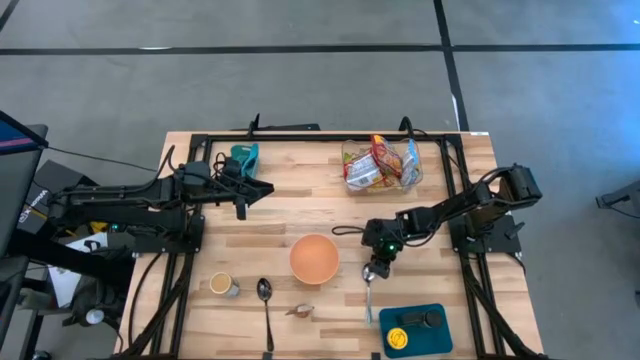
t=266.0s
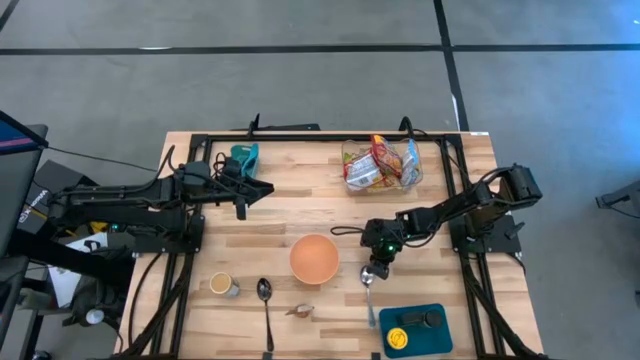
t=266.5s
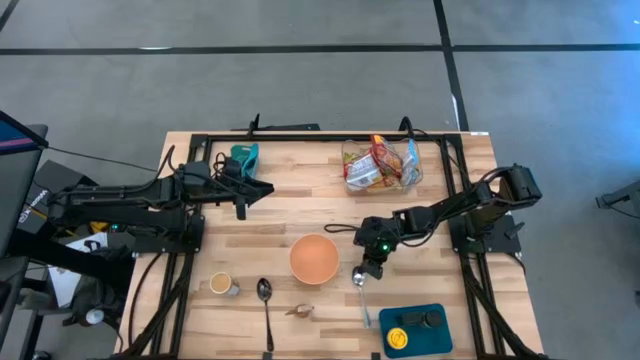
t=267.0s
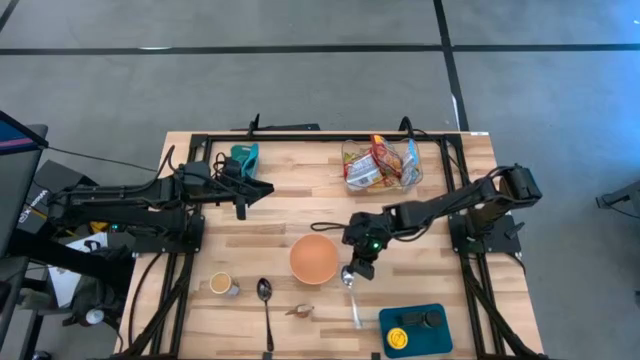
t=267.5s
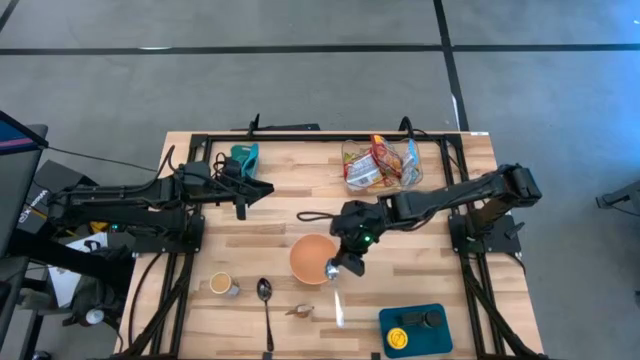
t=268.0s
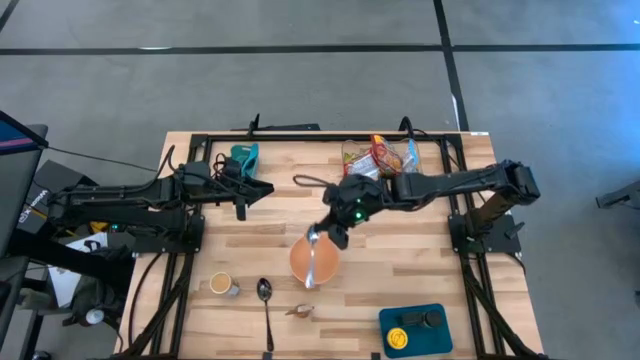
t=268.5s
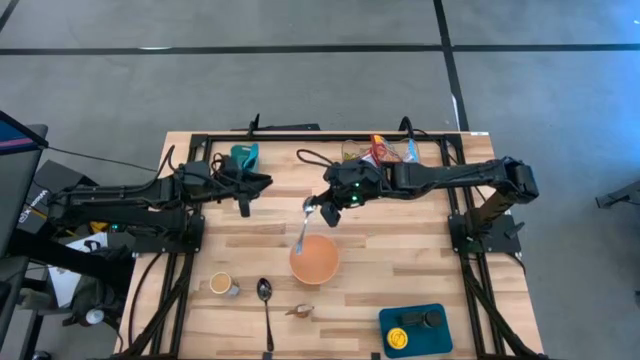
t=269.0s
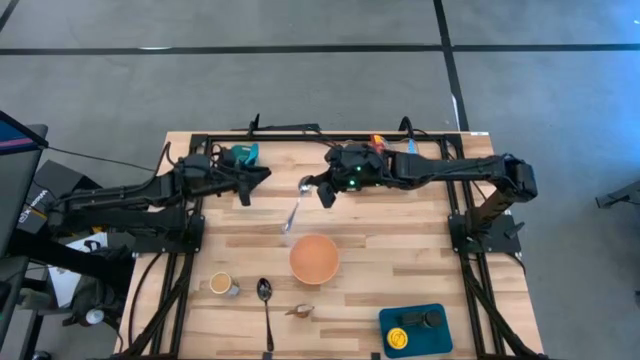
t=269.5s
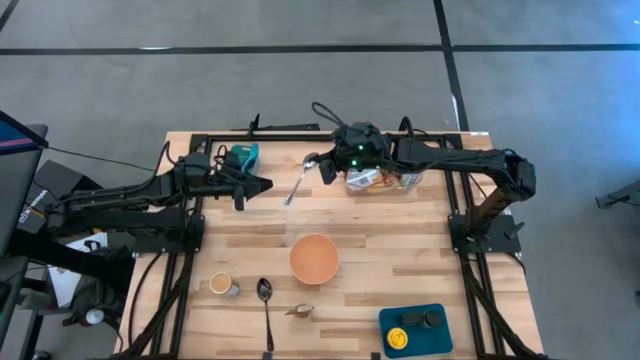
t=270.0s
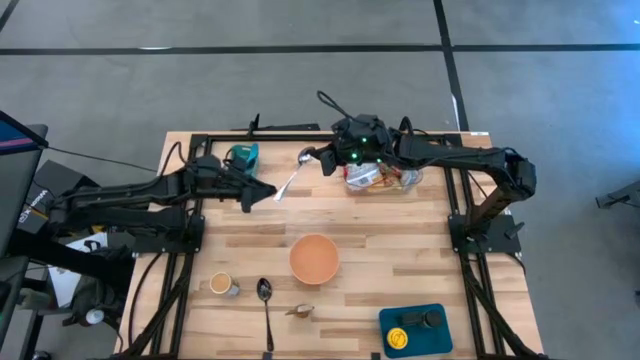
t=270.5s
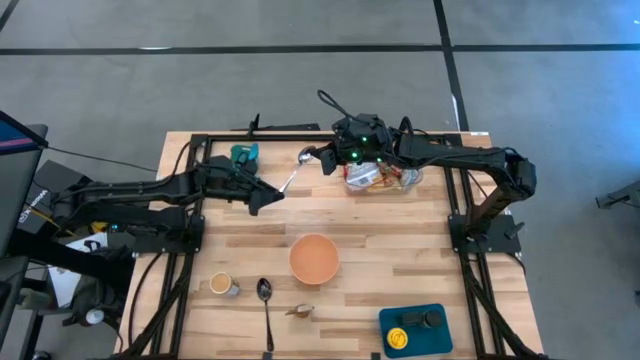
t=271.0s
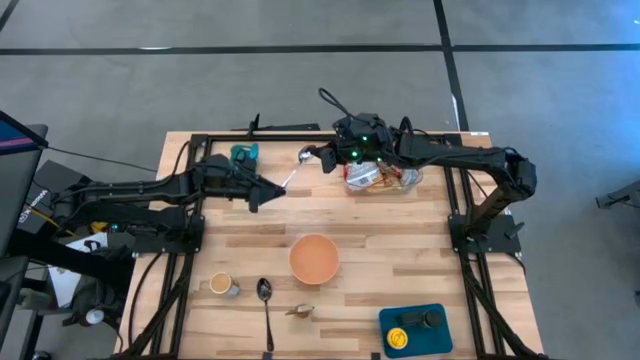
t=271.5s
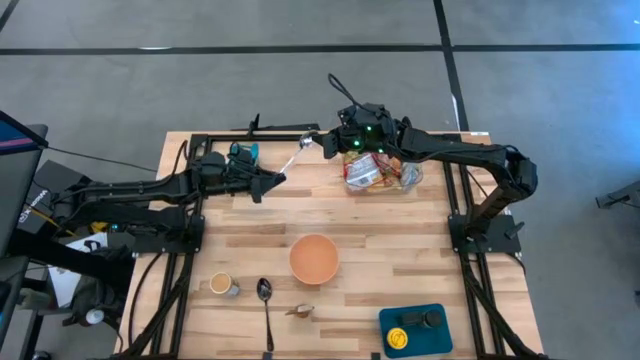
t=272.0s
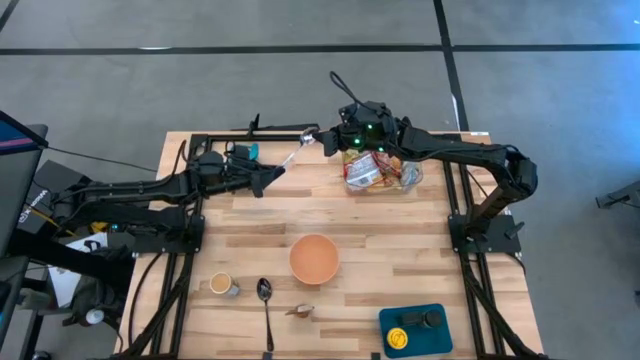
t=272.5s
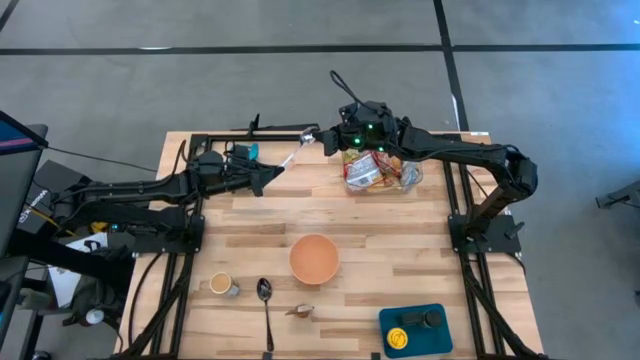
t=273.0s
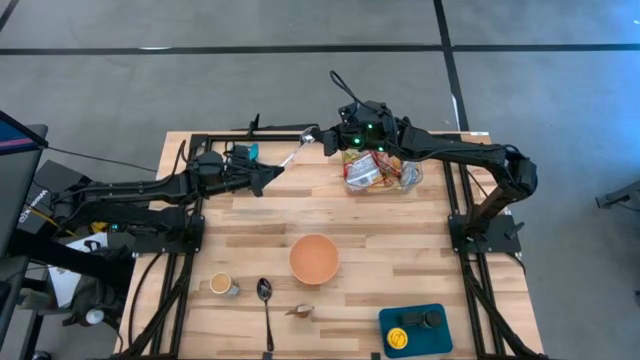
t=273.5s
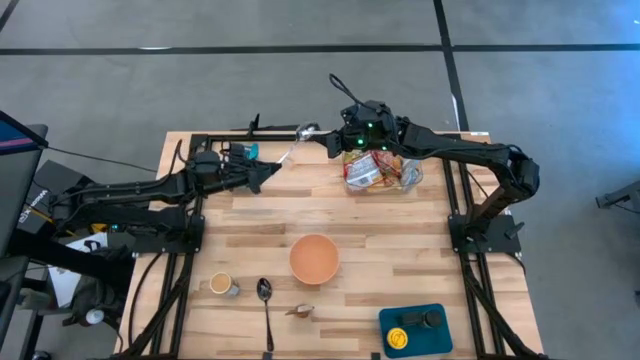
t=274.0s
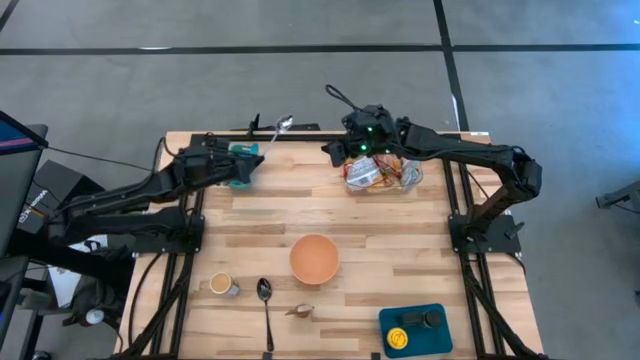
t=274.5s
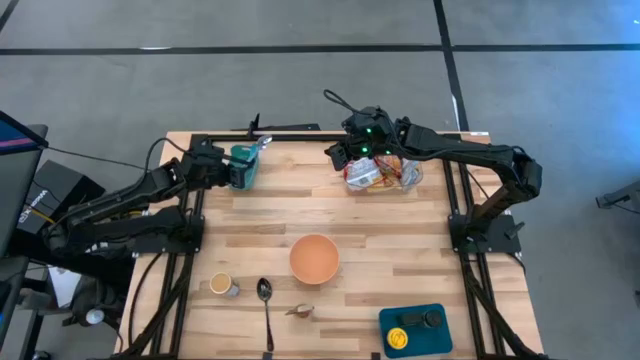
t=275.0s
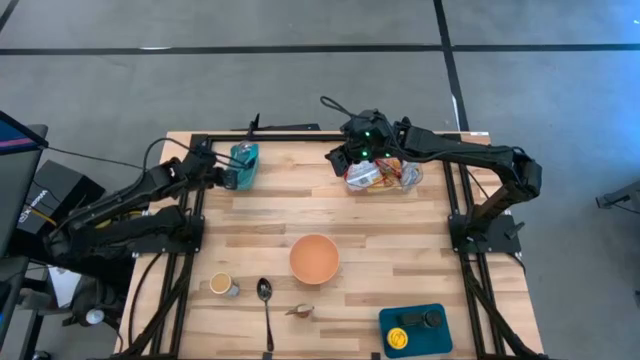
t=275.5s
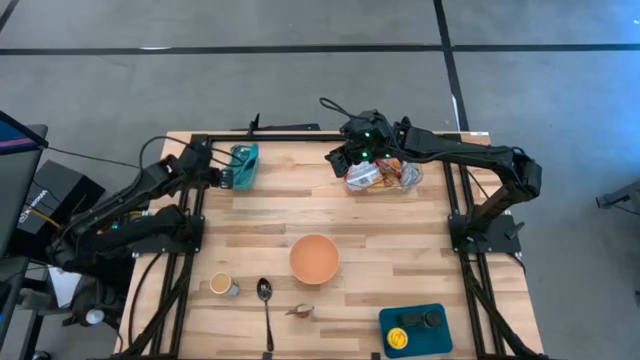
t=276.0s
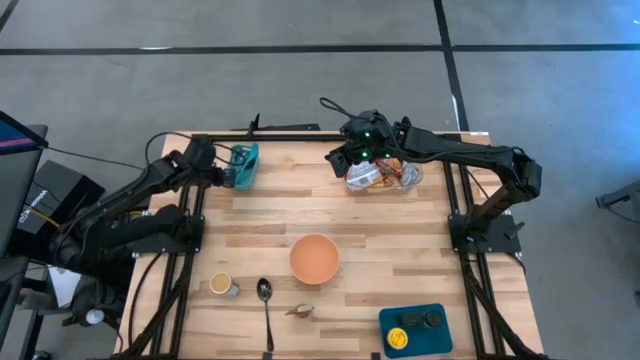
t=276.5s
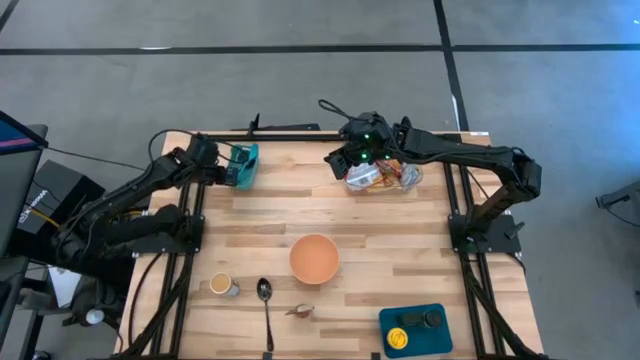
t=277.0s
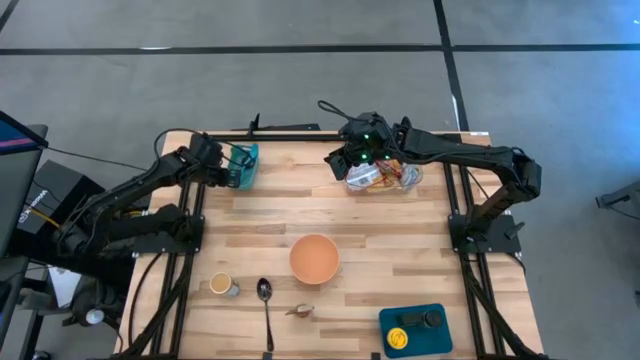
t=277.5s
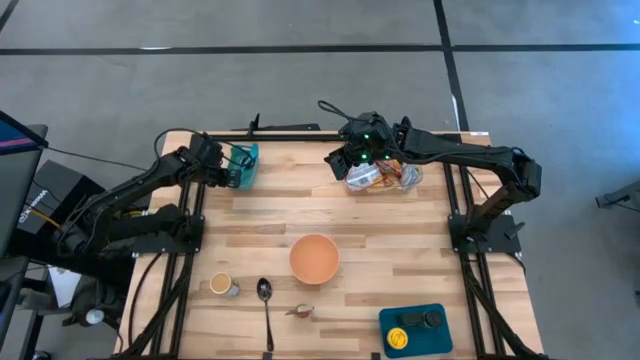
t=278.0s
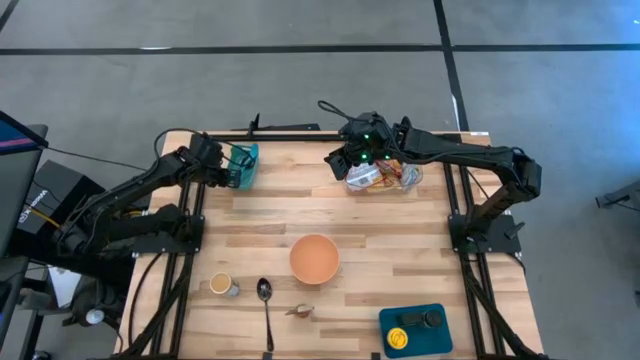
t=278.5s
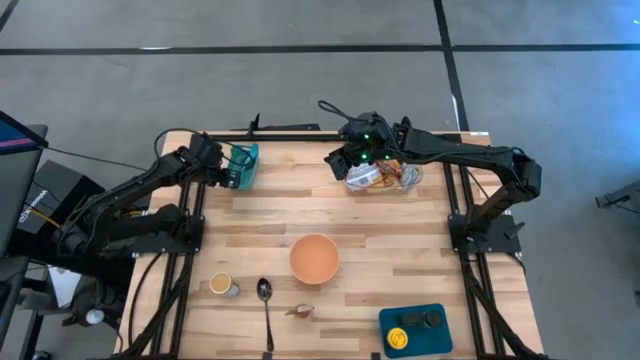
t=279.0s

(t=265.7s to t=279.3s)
Task: Pick & Place Food Item
Put the silver spoon into the light green bin

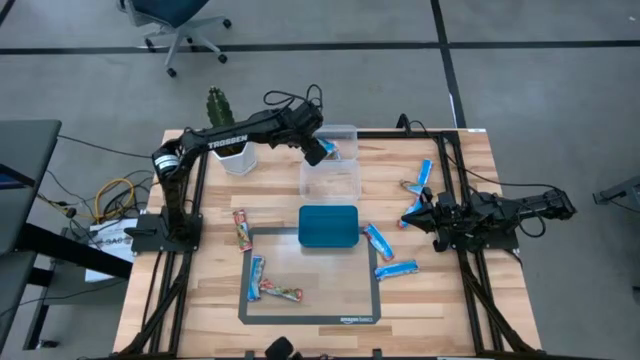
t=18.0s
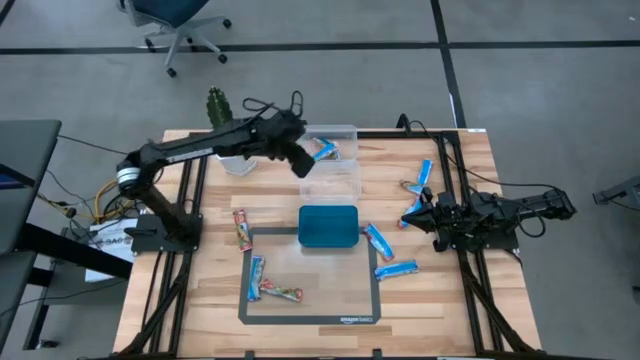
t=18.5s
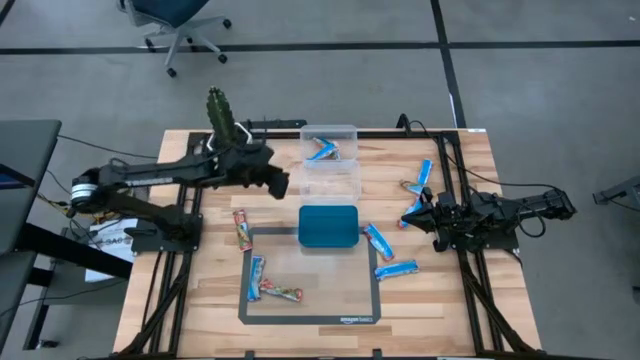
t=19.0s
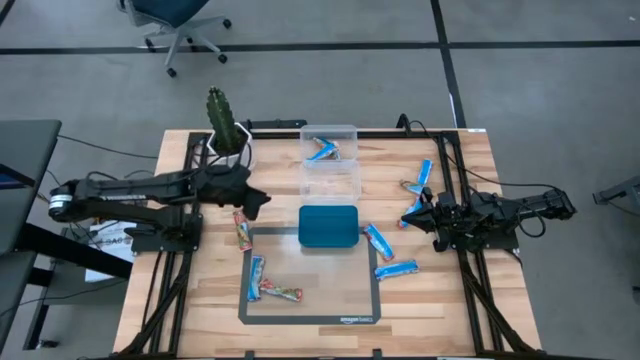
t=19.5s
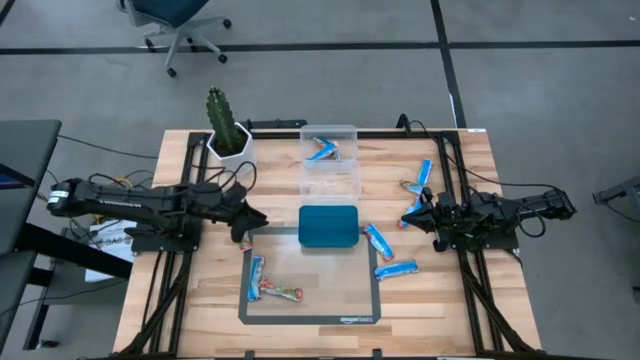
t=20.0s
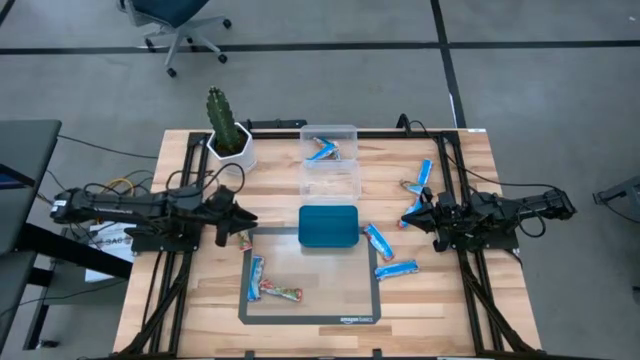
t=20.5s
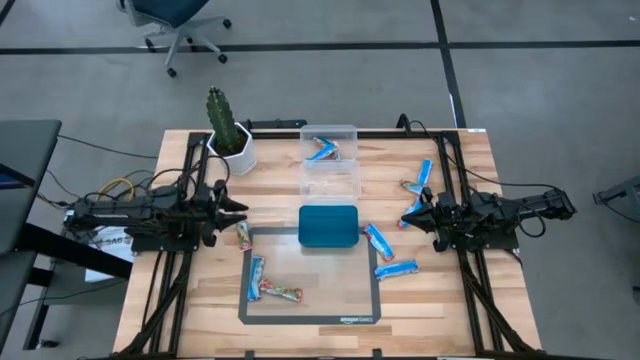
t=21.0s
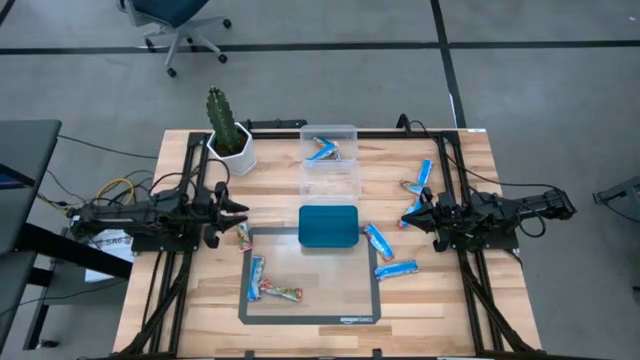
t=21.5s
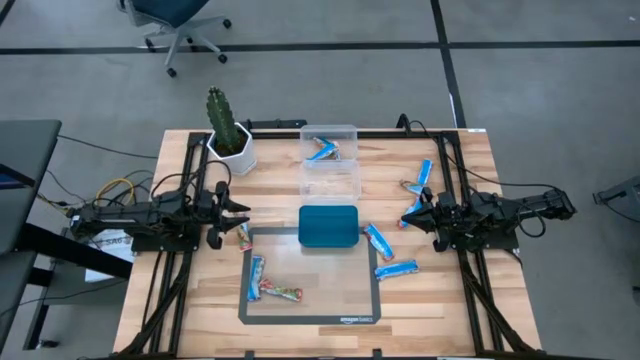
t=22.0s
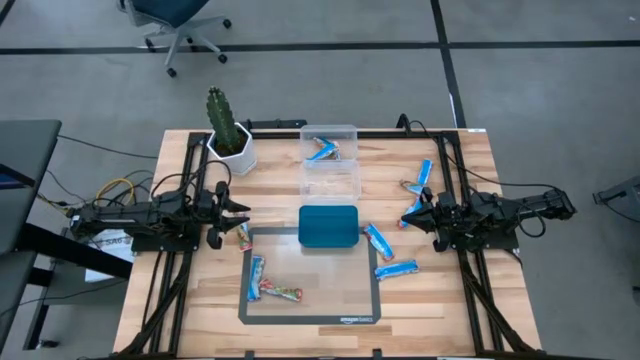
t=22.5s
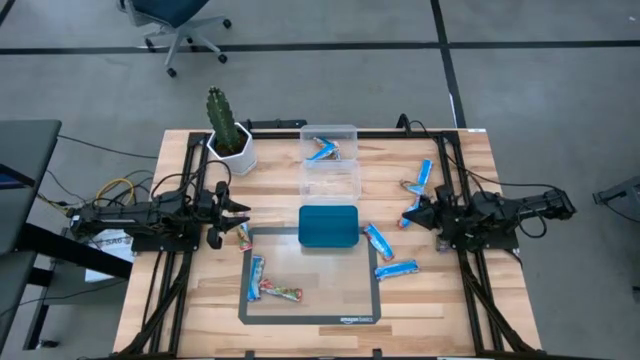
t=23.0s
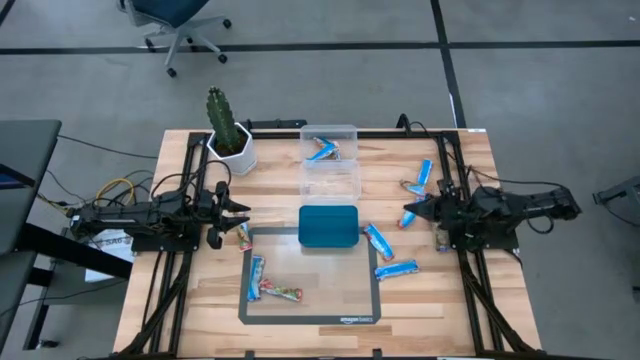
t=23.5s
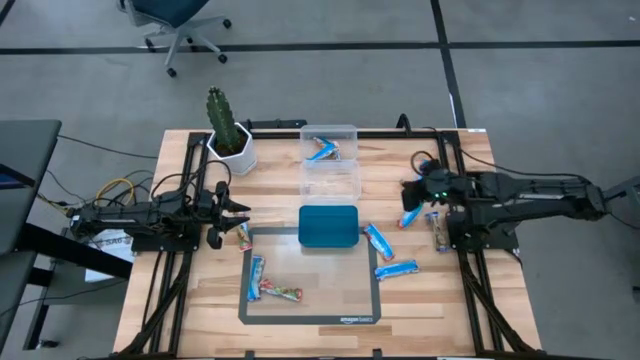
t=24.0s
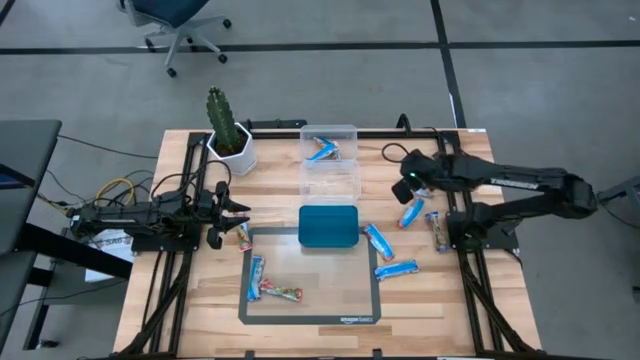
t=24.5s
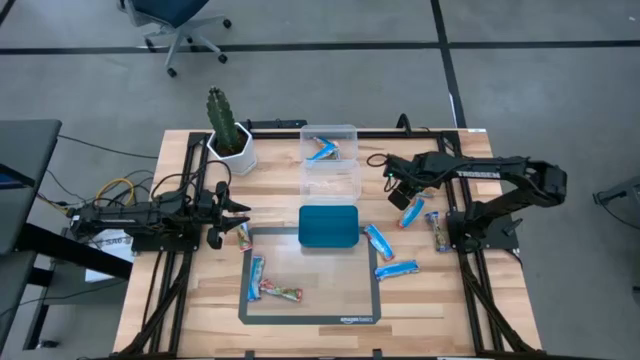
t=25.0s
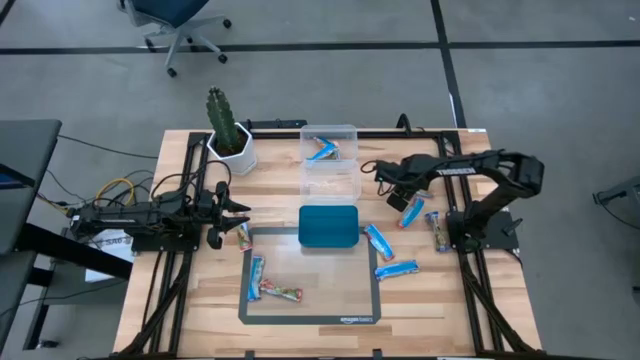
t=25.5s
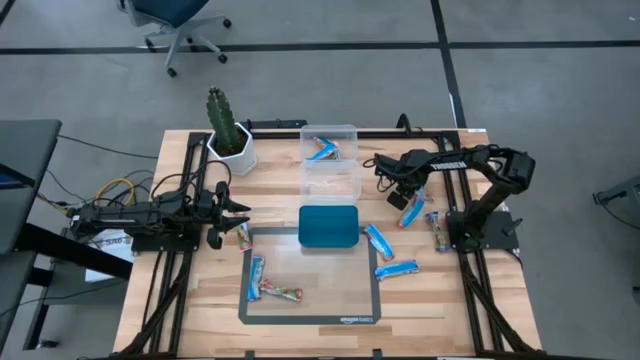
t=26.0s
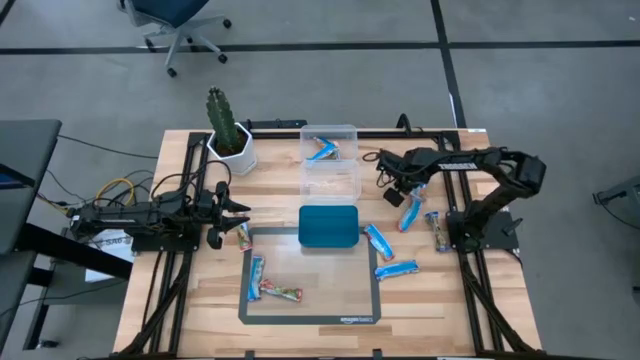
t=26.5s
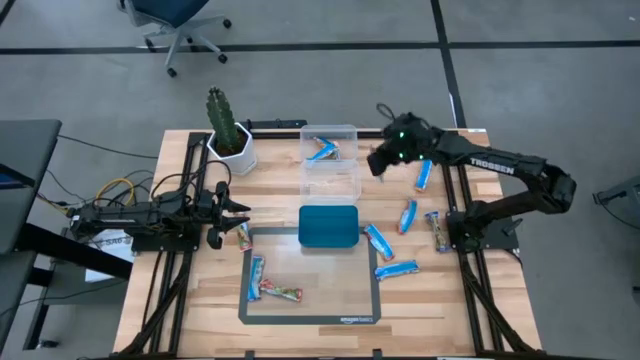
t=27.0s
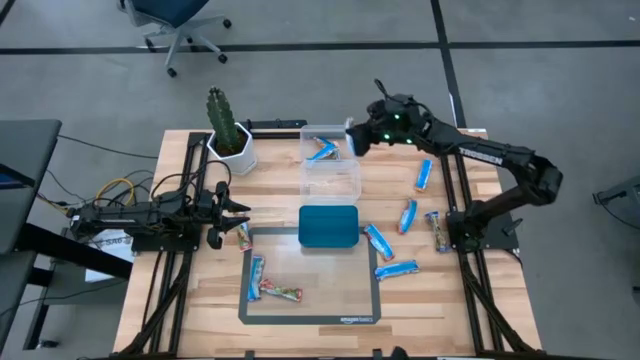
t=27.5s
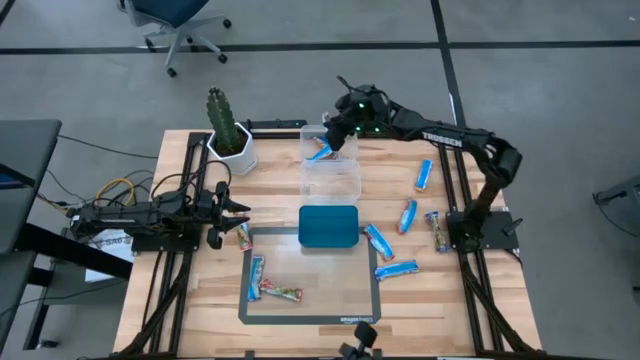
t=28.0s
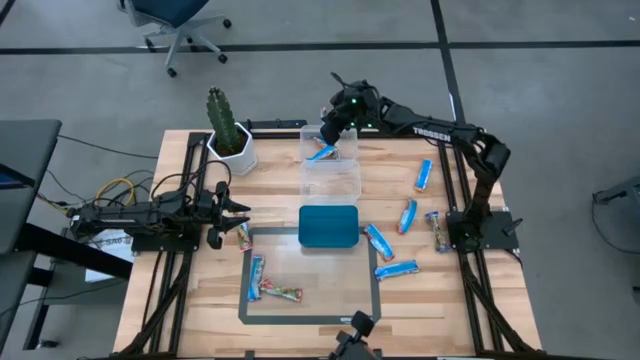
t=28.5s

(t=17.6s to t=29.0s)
Task: Pick and place Granola Bars by type
Put the yellow granola bar into the top transparent bin
